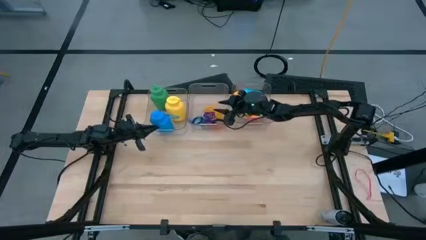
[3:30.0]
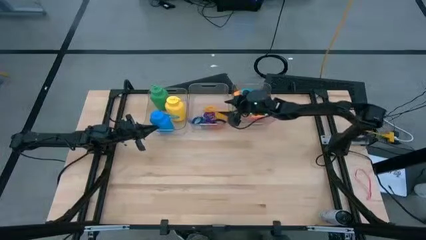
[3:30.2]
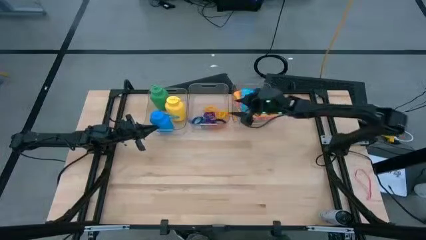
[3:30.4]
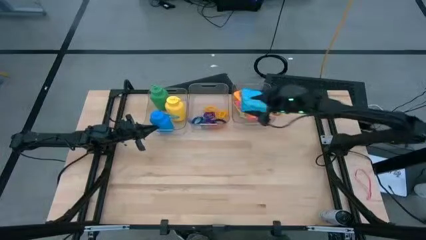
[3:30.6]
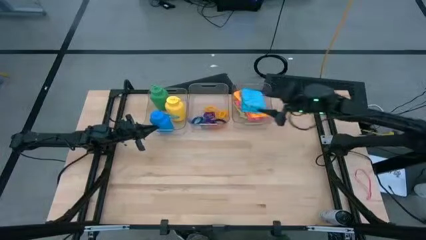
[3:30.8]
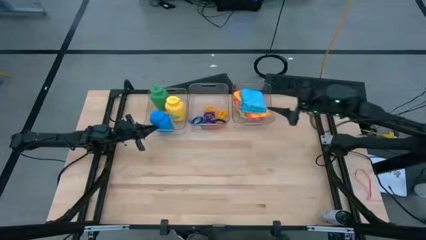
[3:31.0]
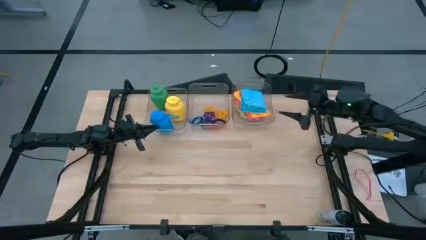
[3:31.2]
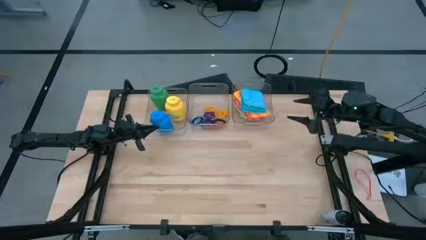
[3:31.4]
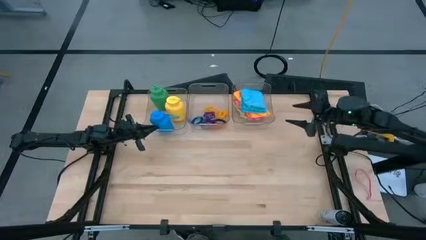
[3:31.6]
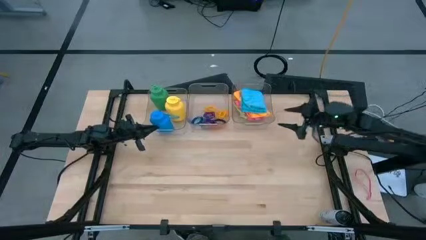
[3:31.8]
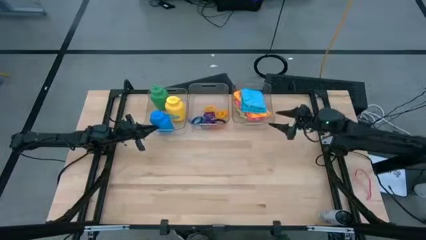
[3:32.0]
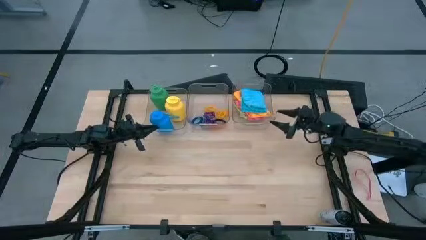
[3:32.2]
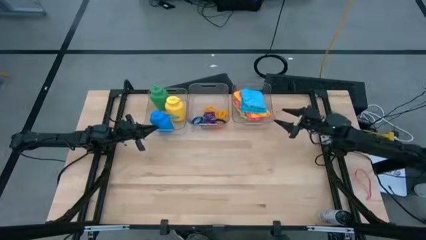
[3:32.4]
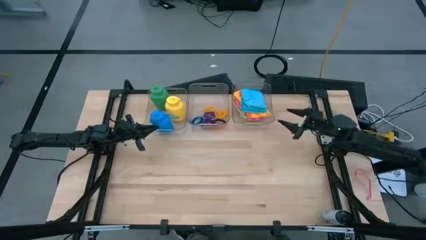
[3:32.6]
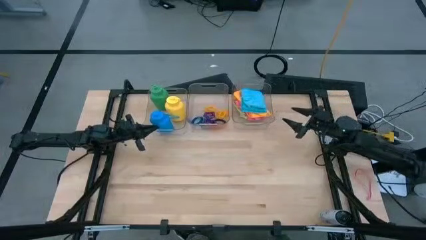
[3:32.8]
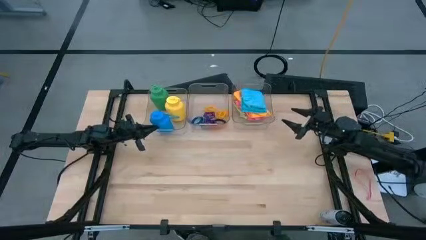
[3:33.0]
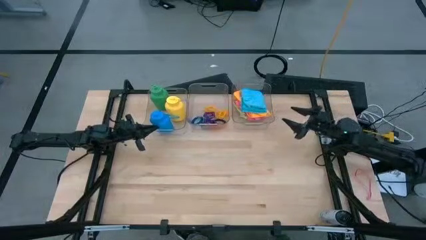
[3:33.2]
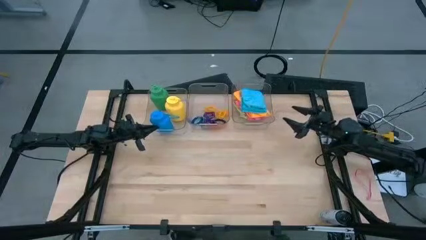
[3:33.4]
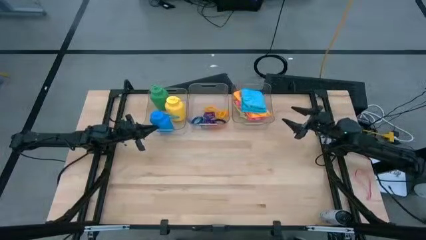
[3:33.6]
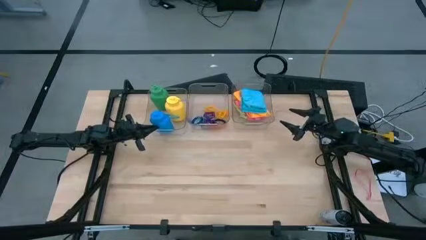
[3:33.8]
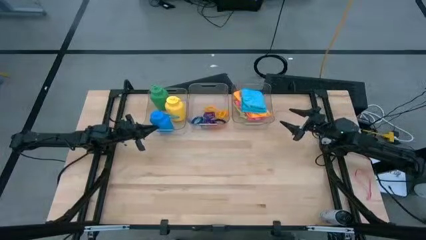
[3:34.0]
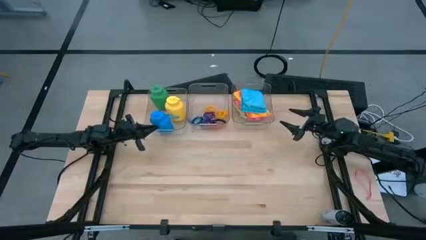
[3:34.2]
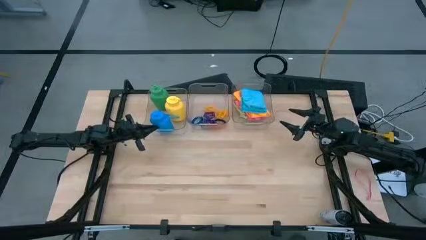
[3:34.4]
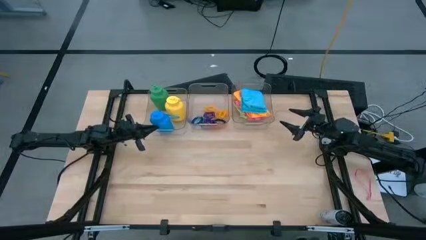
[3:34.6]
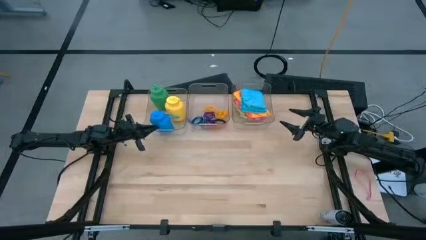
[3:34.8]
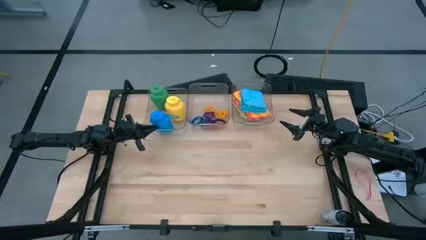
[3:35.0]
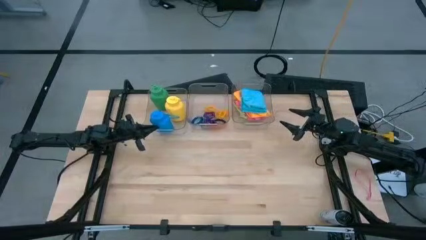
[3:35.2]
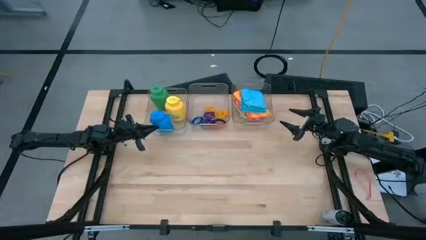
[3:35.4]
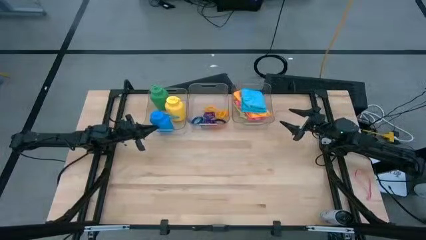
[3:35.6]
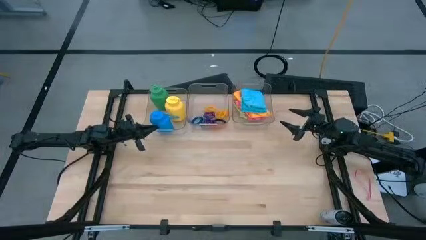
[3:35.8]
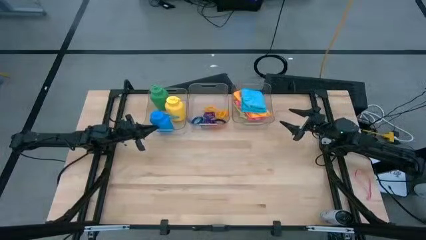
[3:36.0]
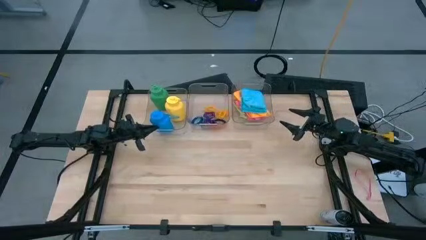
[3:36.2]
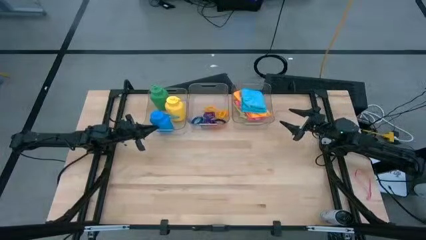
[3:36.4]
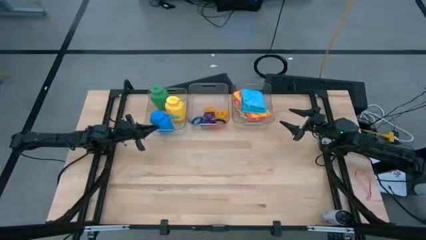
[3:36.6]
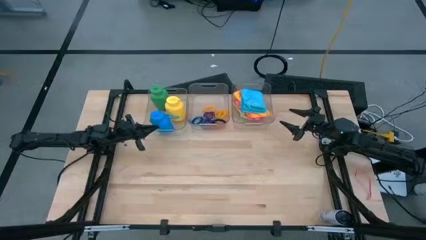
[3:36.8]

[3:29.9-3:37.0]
Task: Pick & Place Sports Items
Return to Home Position

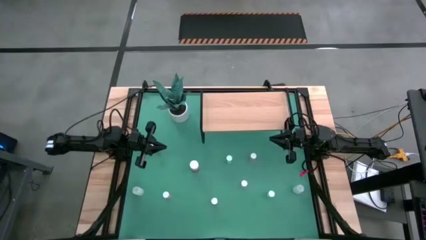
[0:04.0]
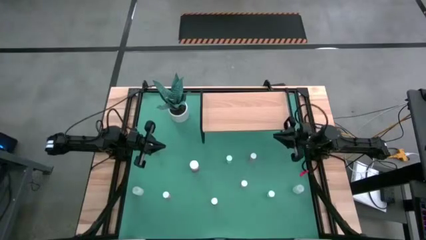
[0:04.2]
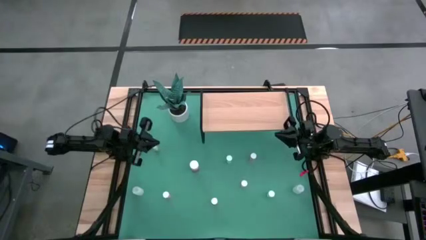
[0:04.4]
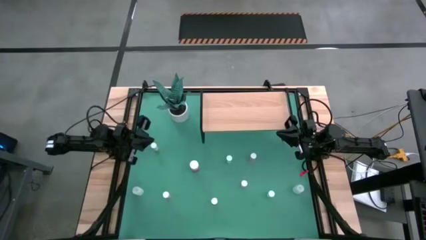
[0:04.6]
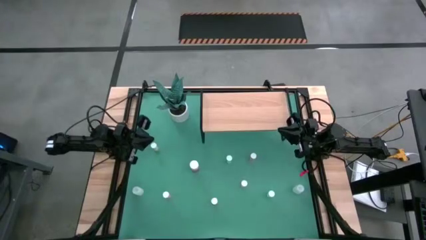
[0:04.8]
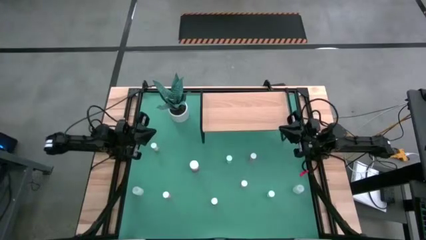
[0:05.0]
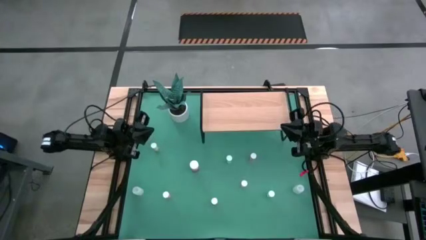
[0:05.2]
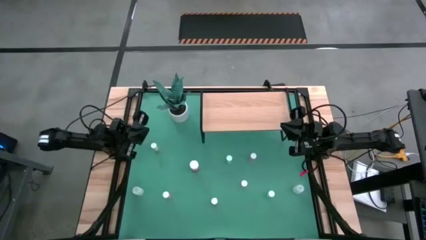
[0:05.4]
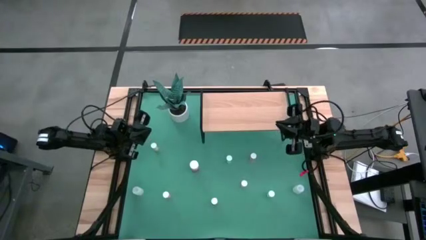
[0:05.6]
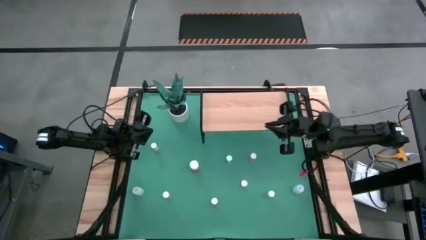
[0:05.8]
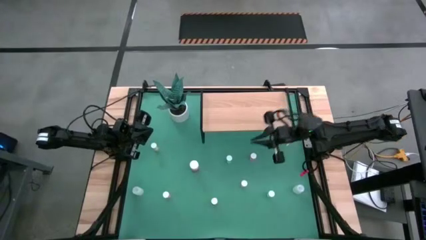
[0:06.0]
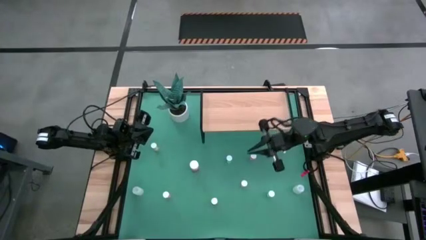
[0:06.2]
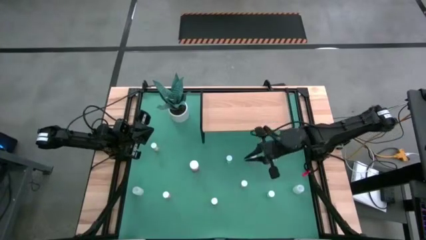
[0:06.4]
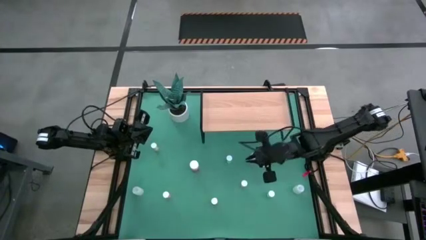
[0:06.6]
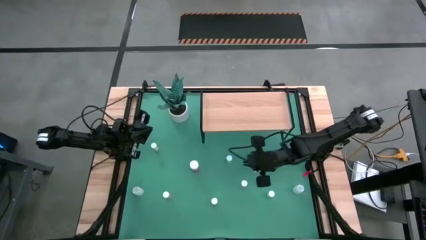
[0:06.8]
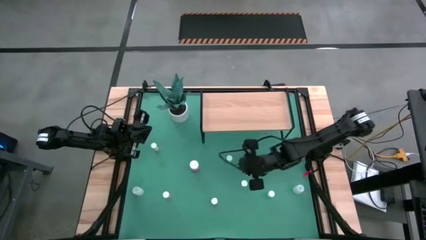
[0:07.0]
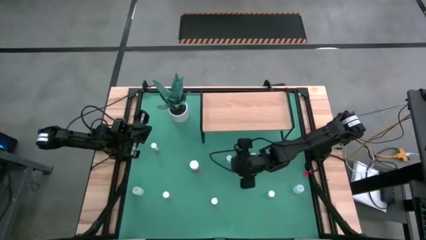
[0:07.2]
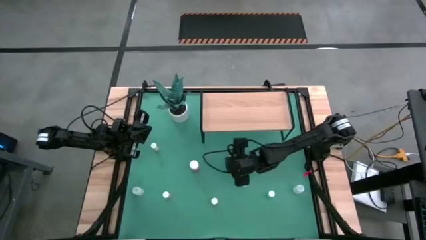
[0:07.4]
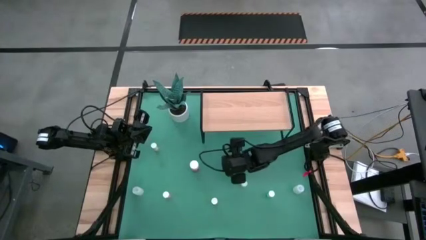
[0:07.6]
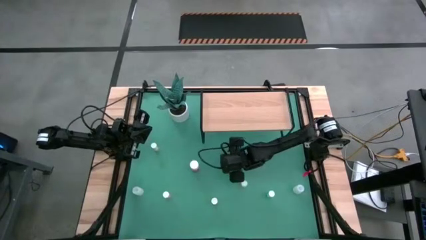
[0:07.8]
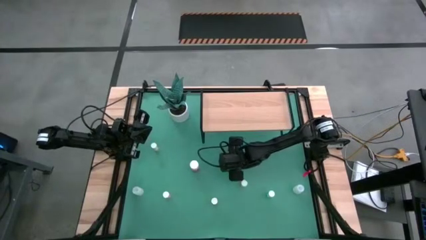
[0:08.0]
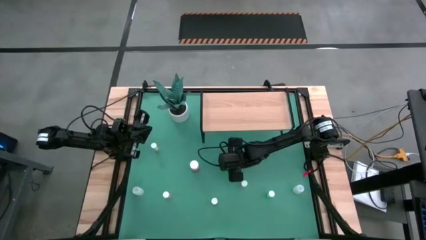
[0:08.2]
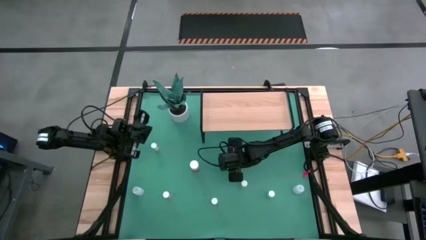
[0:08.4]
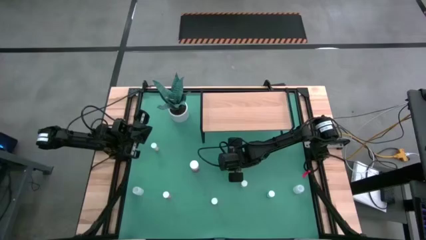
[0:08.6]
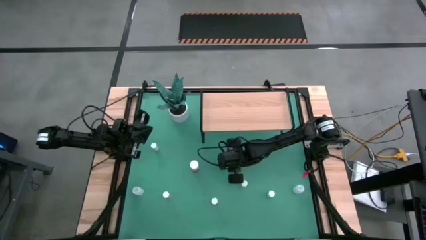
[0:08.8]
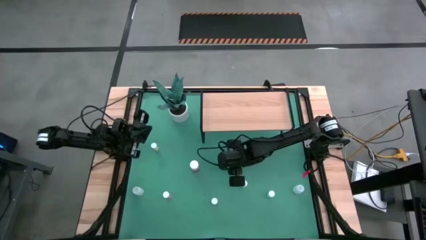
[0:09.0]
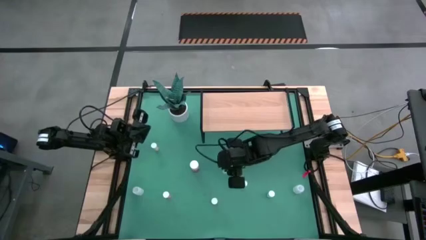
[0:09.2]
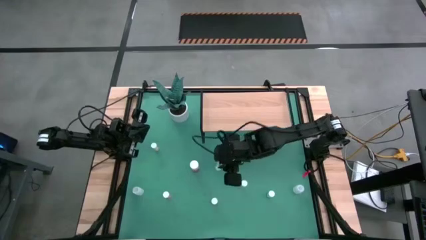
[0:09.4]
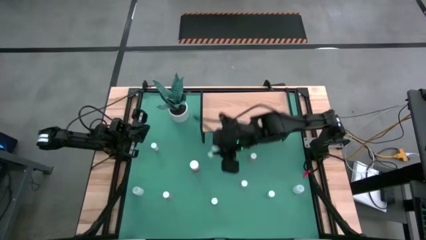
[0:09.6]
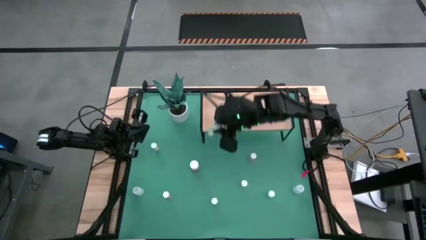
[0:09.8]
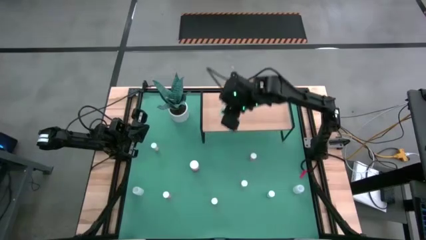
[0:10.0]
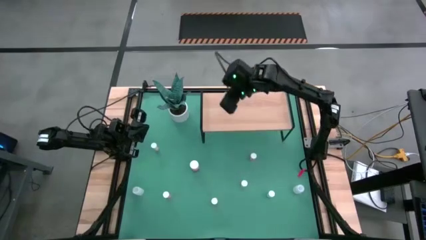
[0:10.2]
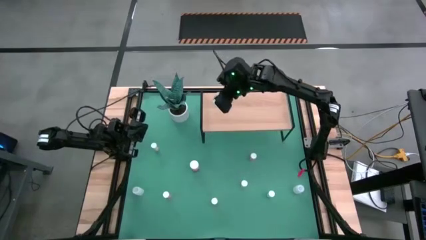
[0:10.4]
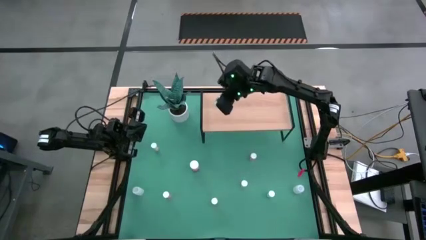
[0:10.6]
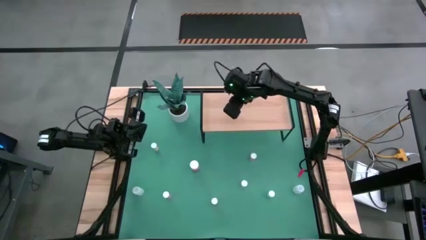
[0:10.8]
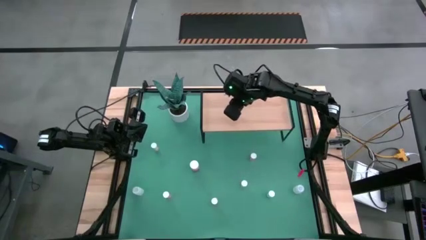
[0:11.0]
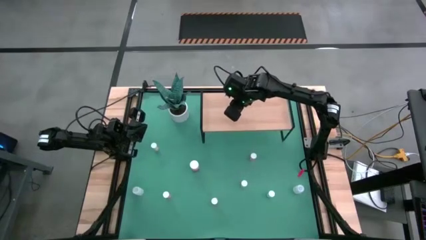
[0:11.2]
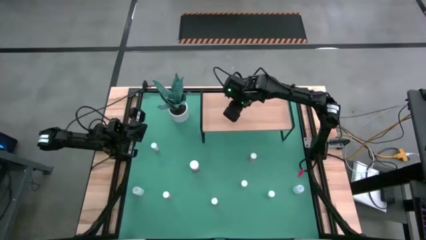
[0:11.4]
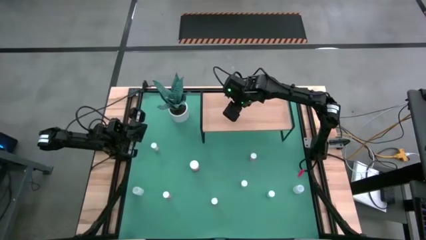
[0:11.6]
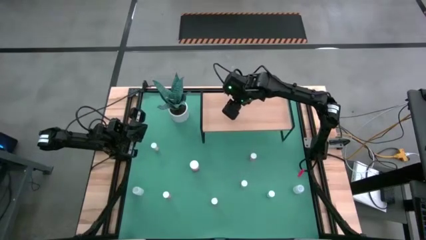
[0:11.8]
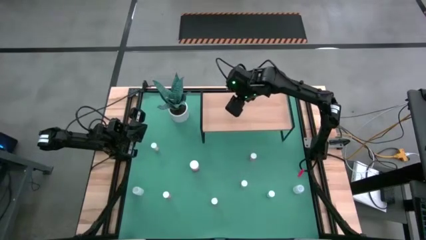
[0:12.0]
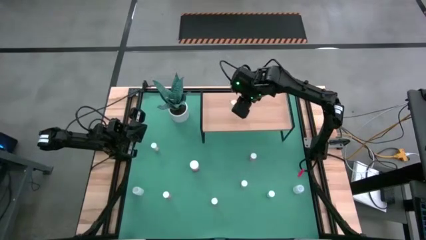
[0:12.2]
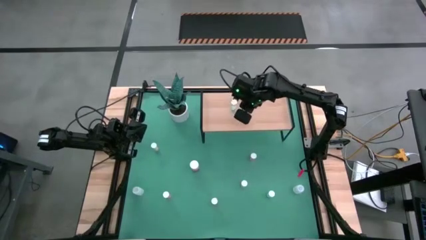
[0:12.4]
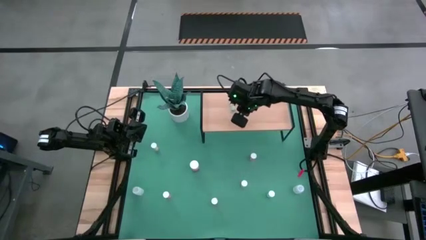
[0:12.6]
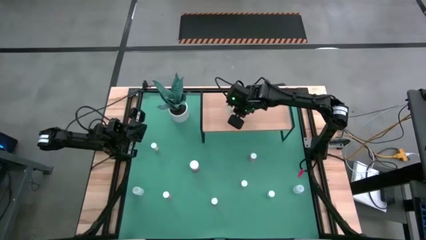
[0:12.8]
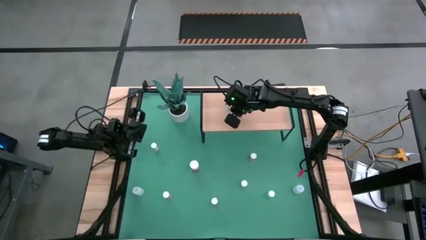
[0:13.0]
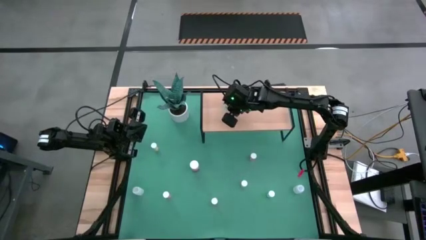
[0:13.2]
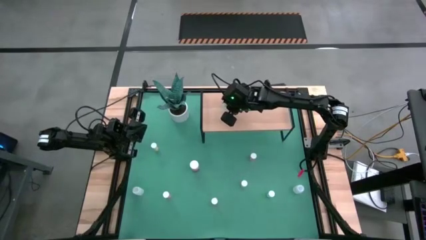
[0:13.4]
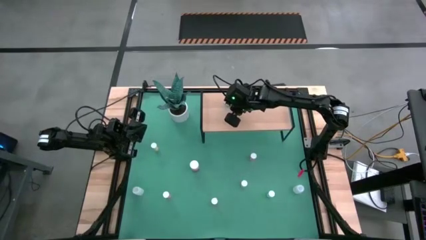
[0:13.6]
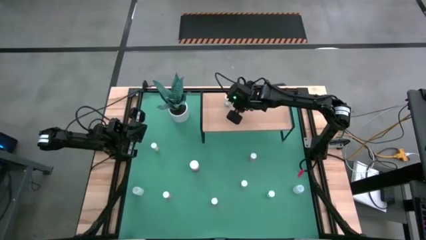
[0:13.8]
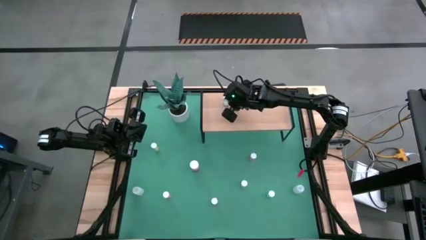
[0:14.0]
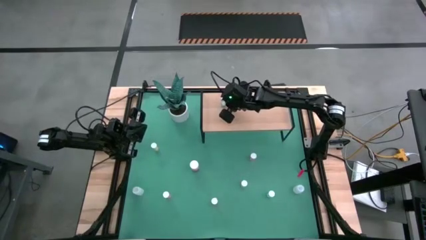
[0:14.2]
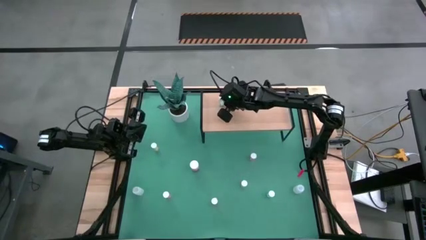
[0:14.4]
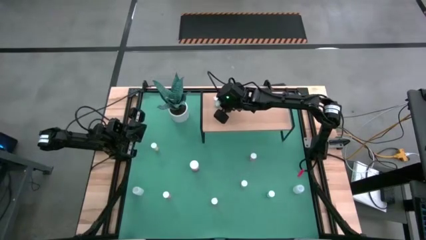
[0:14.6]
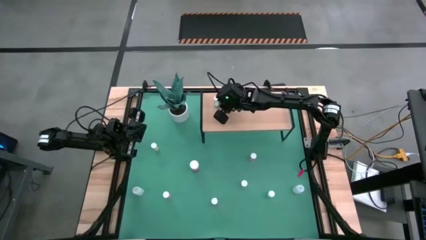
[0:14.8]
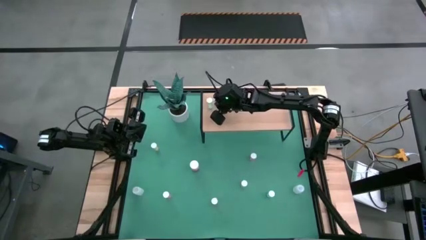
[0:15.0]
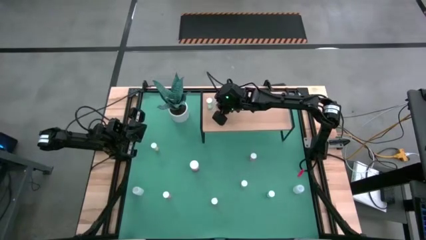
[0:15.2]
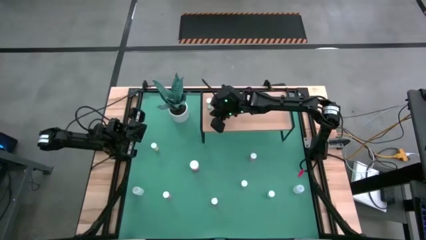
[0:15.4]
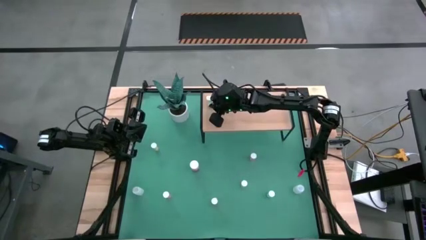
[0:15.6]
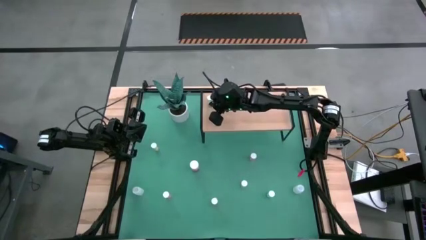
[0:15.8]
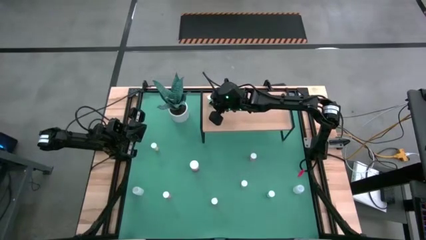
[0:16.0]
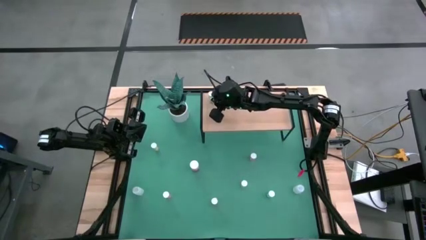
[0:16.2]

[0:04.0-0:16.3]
Task: Pick and place medicine bottles onto shelf by color
Put the top blue pill bottle on the shelf
